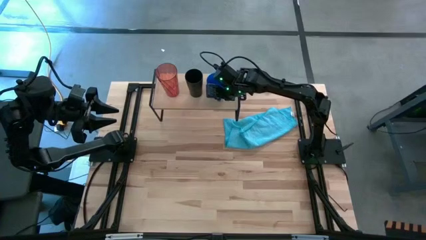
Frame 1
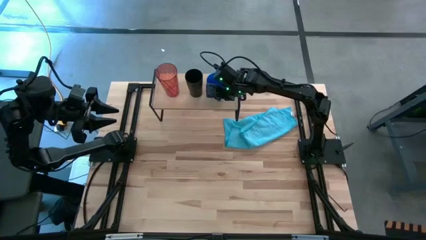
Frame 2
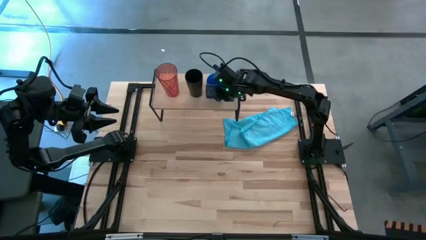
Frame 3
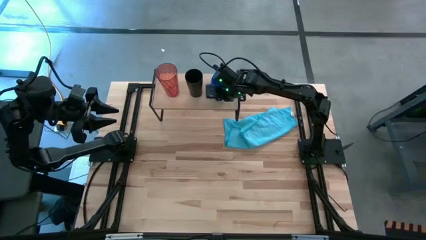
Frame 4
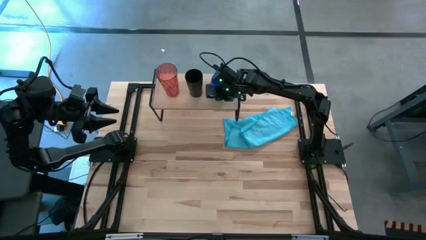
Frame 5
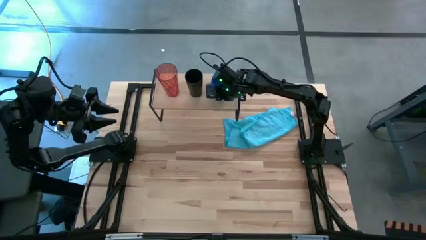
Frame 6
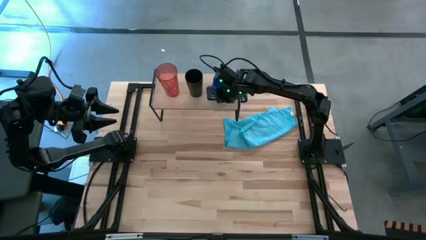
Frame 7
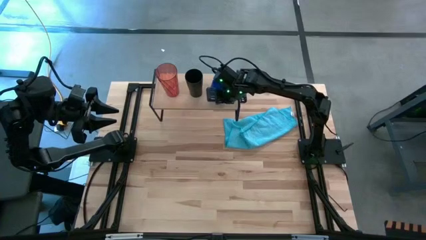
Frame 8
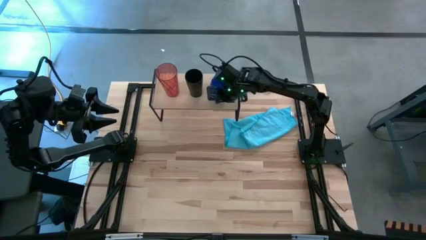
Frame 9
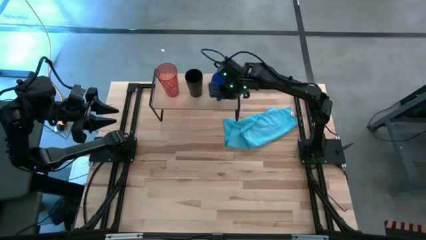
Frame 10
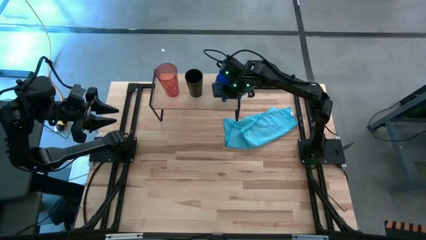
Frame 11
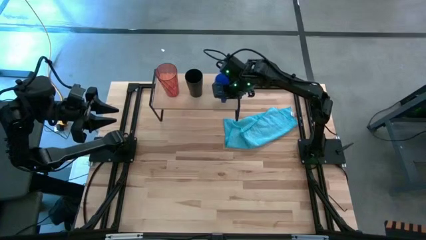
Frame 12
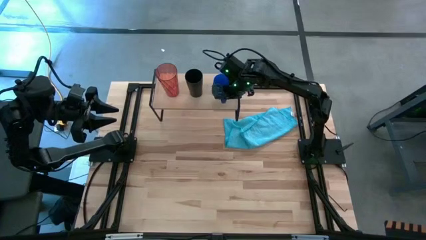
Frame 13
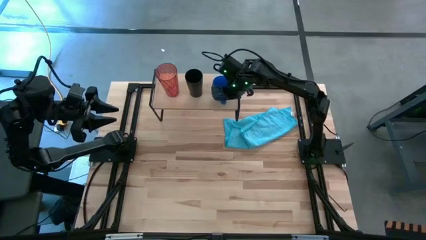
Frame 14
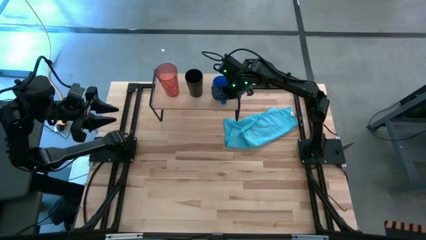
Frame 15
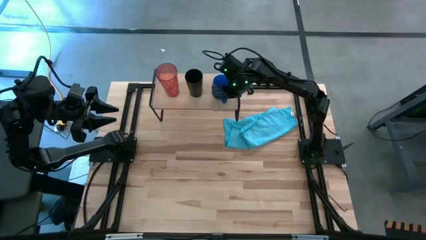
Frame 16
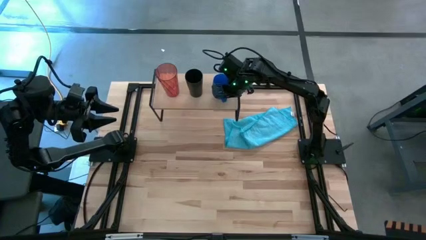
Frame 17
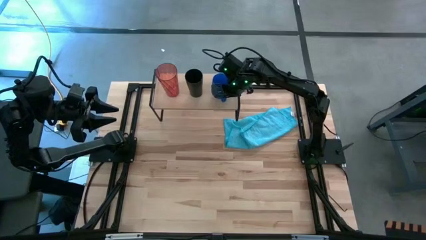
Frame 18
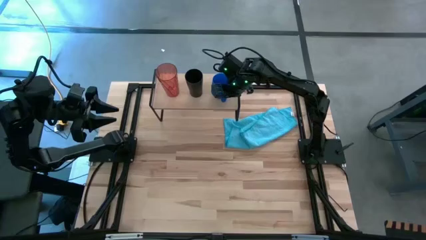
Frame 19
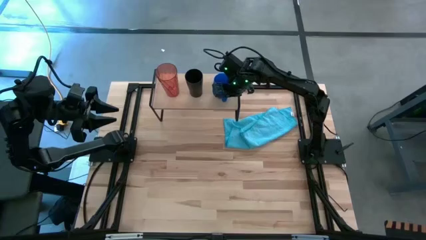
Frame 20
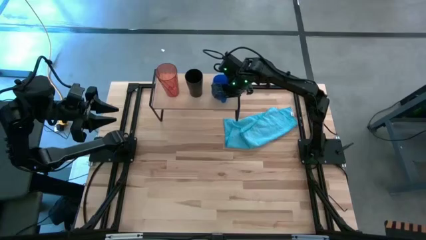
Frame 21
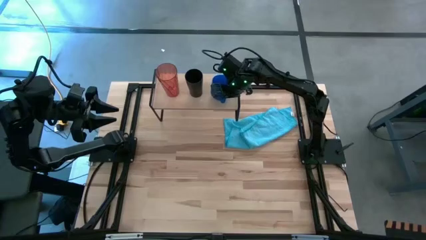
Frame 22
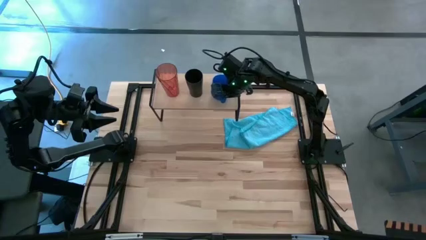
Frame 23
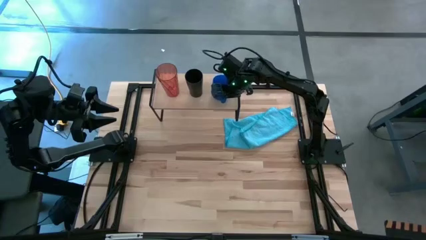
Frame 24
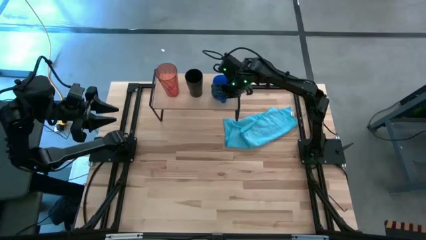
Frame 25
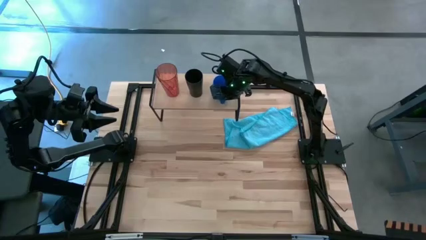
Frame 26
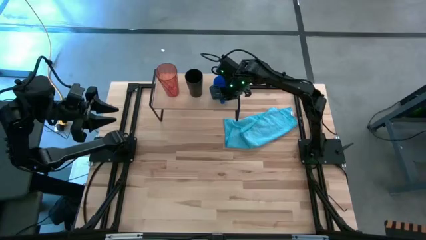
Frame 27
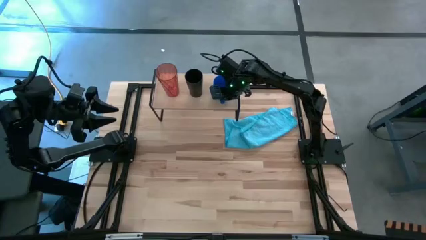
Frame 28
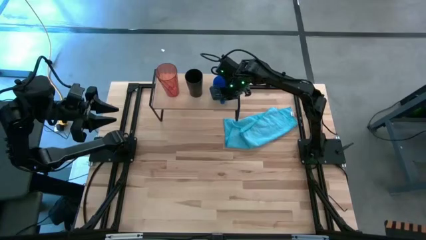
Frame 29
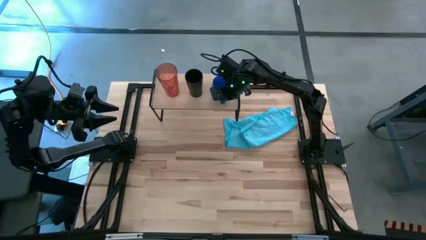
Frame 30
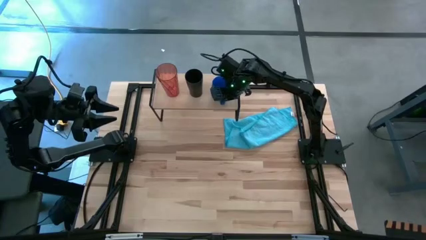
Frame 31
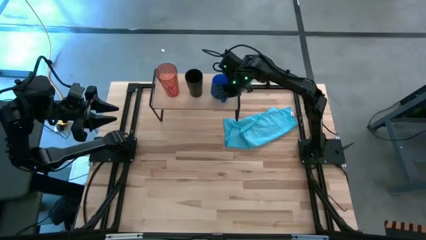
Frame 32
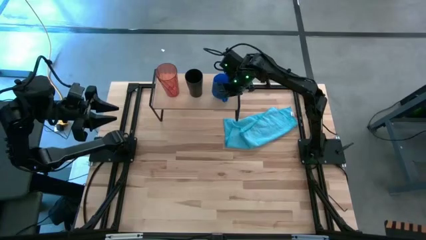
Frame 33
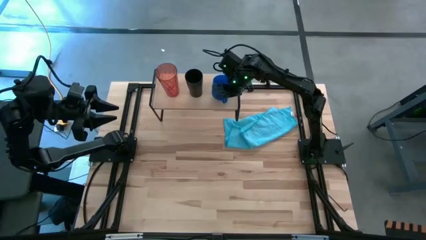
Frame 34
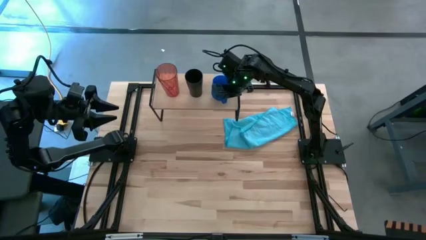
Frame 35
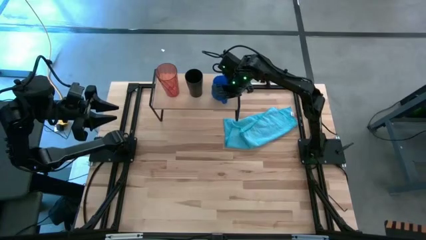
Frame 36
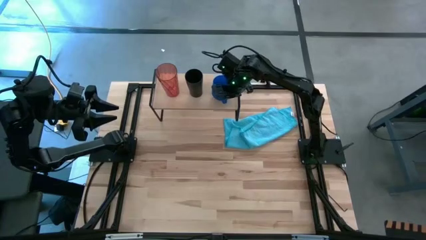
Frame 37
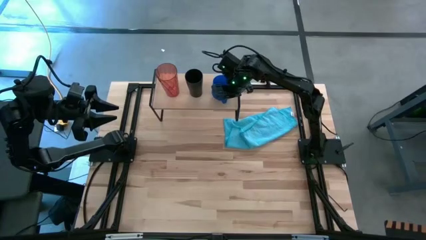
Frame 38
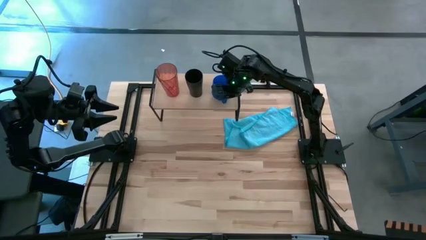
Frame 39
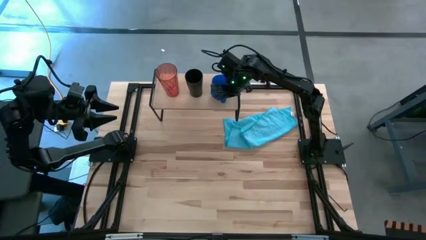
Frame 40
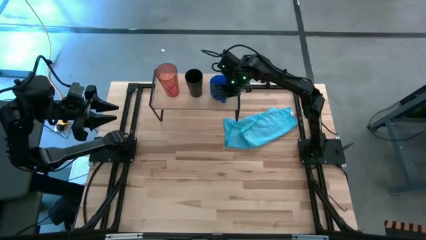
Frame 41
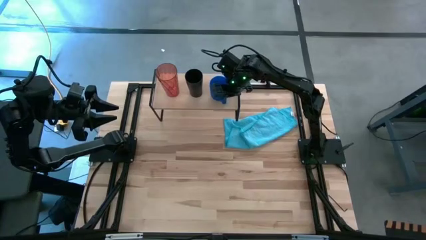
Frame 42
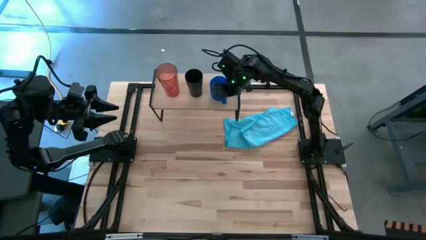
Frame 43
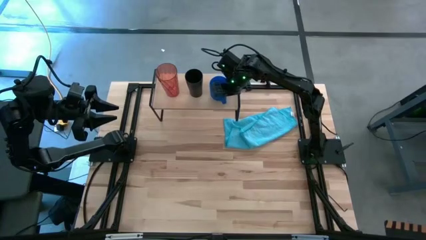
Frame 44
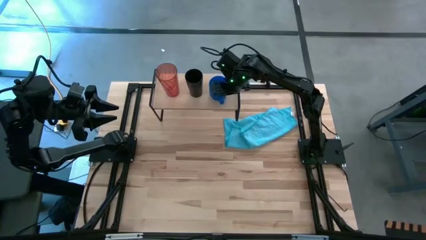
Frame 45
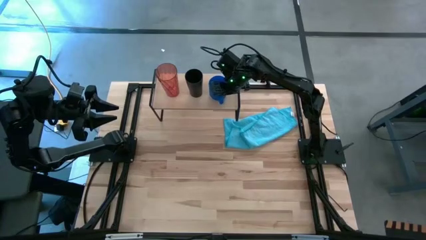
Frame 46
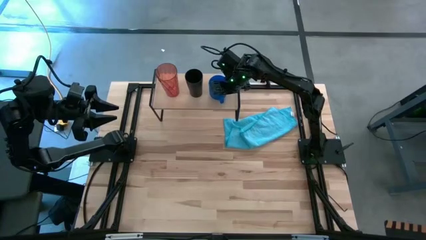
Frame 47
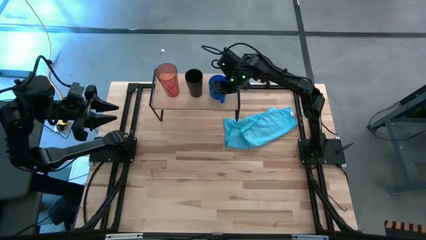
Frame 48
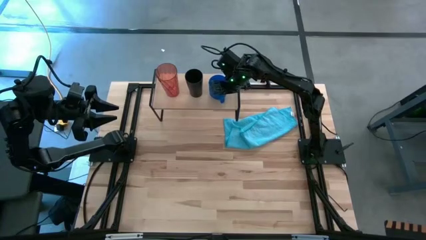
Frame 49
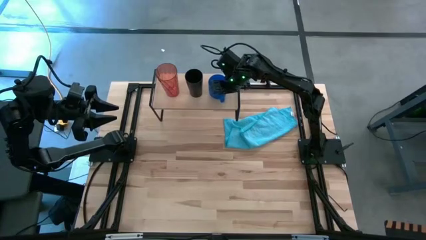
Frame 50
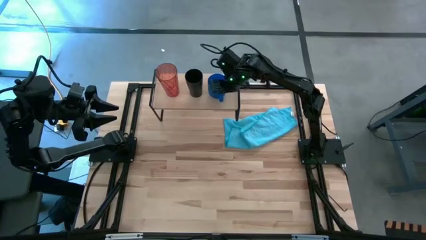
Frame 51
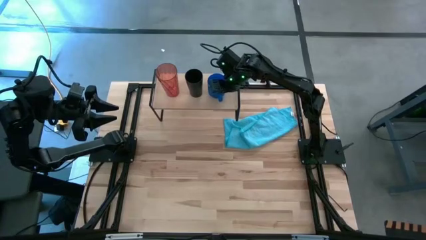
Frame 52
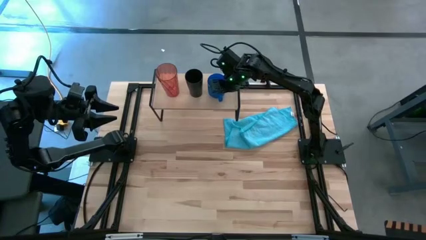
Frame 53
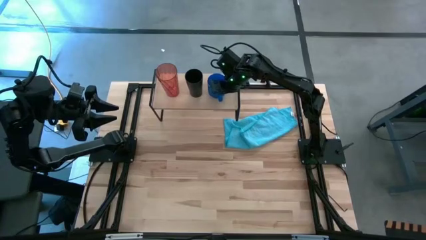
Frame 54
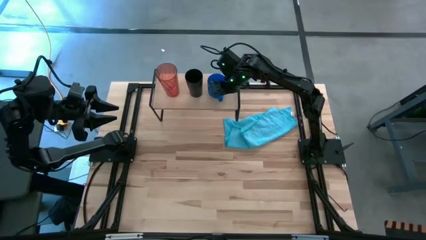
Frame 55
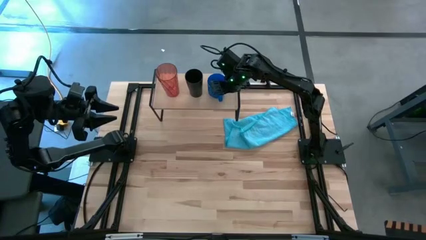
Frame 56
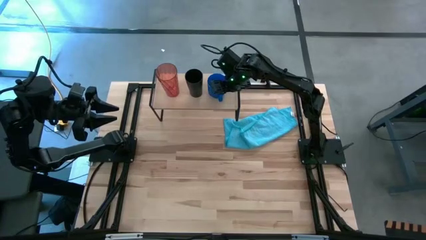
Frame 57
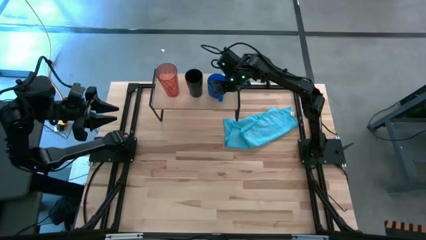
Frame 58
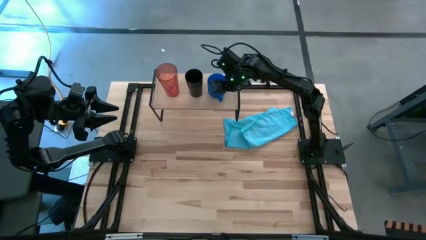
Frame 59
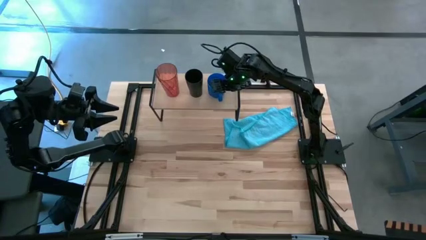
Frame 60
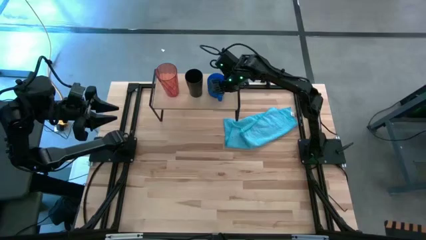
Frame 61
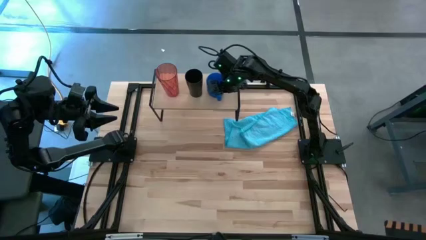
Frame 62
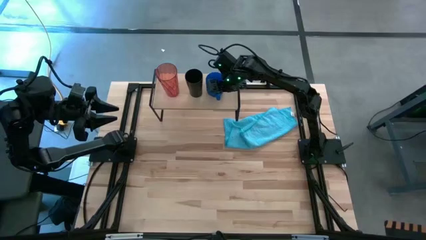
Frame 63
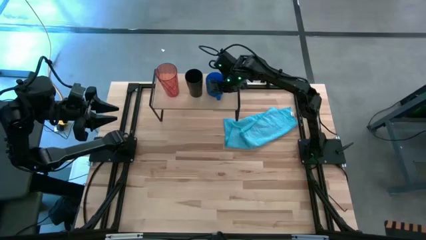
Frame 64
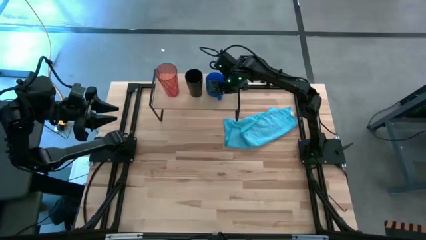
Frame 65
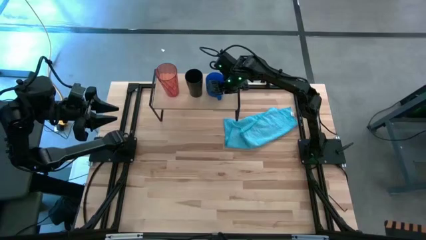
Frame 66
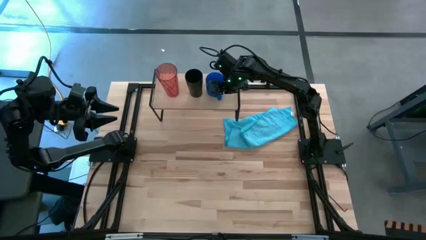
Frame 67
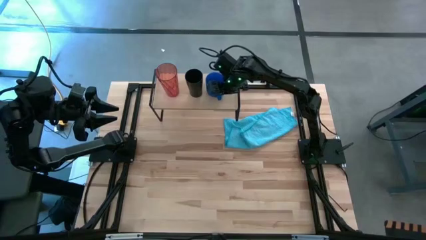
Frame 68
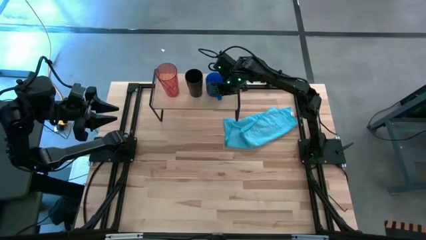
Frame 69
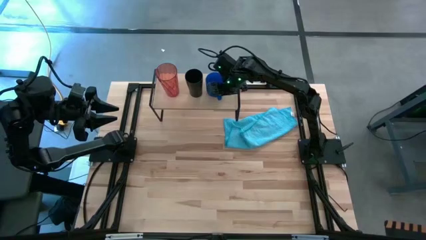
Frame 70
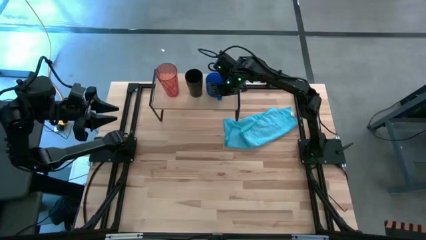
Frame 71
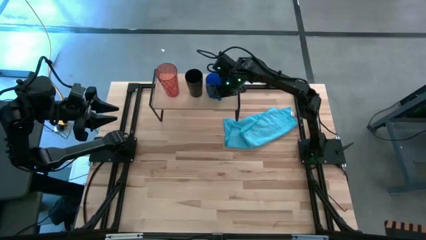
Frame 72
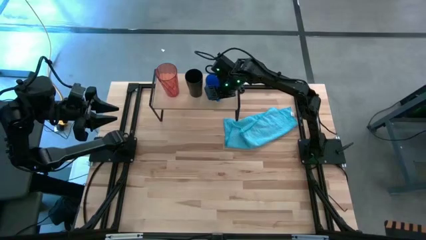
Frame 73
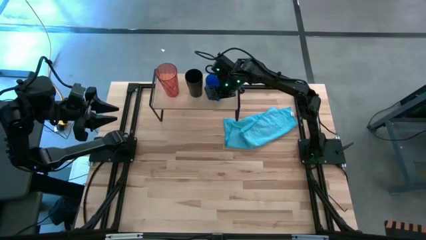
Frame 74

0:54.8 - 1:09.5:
Task: Stack small to large cups/mugs on shelf
Put the blue mug on the shelf
